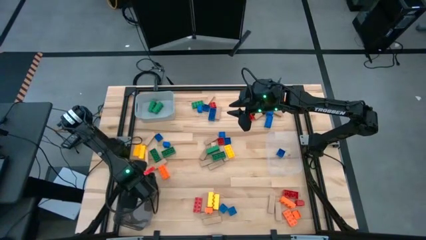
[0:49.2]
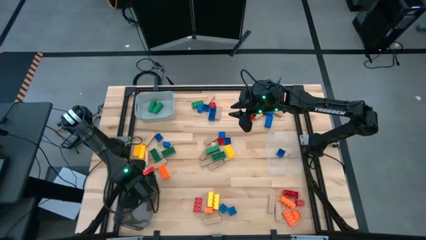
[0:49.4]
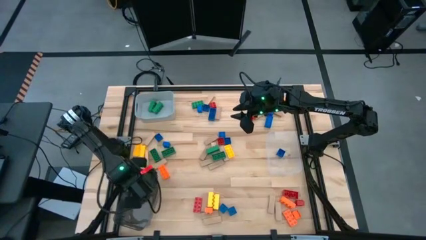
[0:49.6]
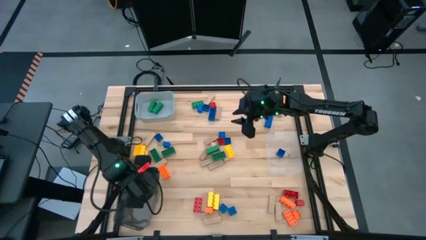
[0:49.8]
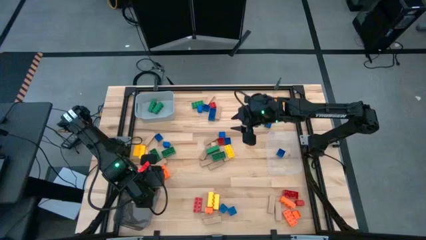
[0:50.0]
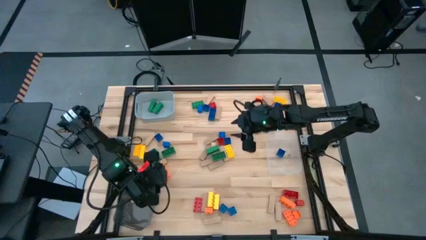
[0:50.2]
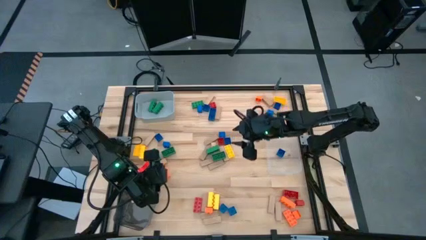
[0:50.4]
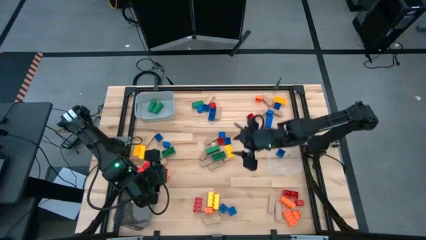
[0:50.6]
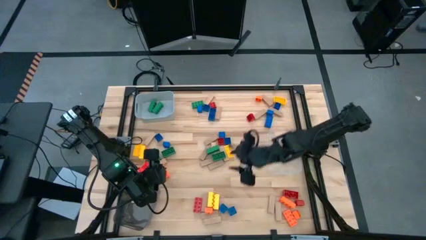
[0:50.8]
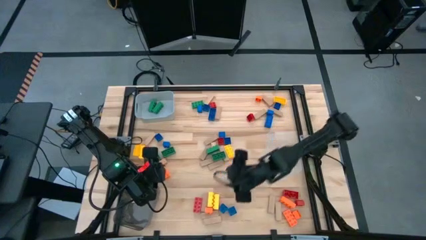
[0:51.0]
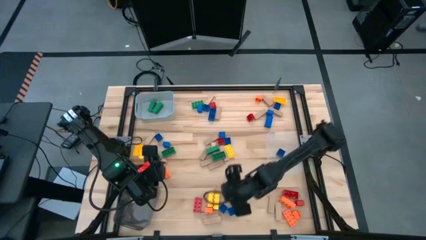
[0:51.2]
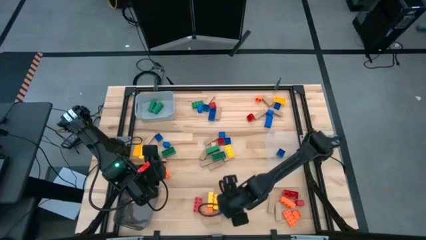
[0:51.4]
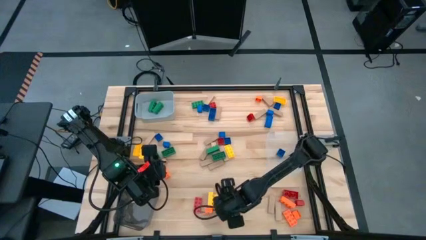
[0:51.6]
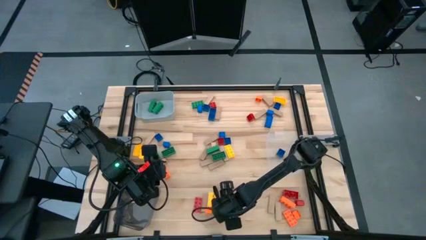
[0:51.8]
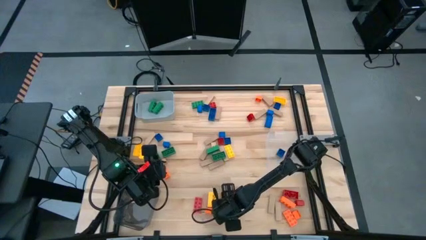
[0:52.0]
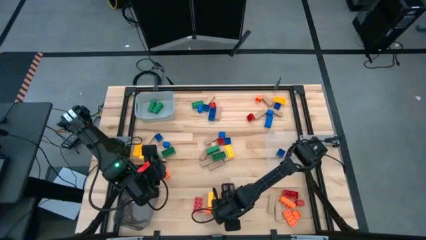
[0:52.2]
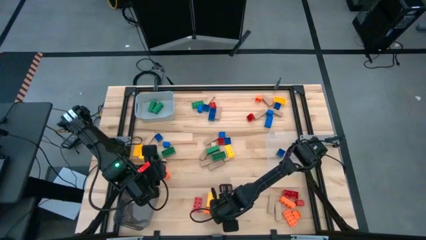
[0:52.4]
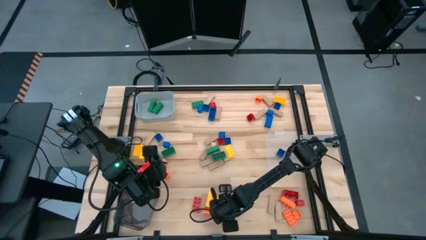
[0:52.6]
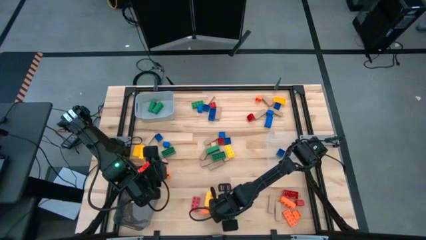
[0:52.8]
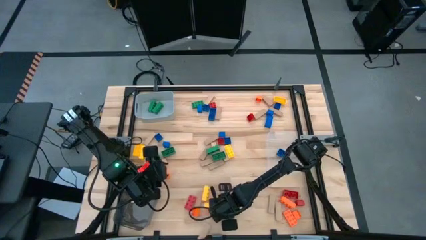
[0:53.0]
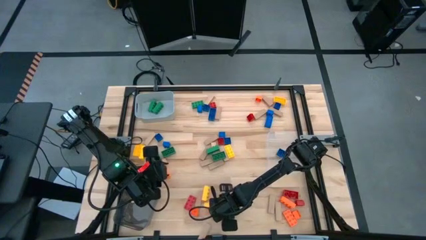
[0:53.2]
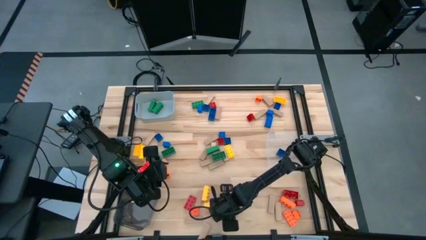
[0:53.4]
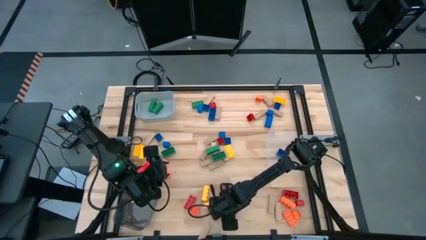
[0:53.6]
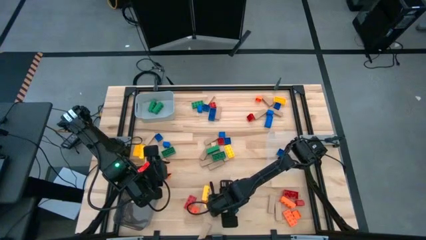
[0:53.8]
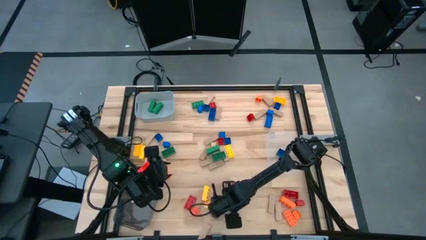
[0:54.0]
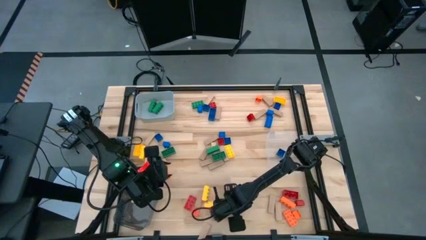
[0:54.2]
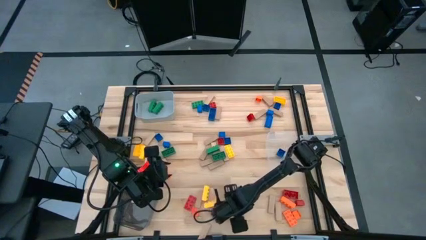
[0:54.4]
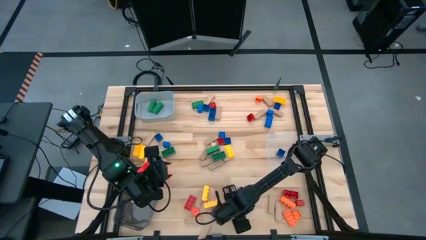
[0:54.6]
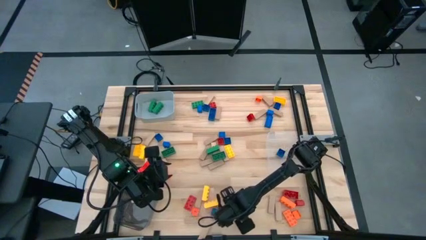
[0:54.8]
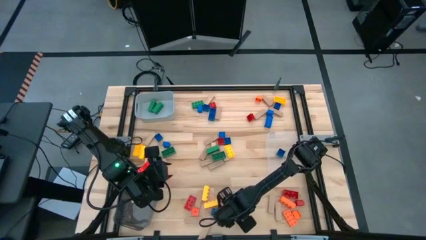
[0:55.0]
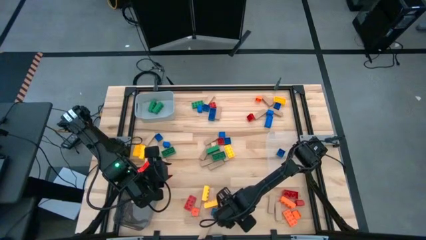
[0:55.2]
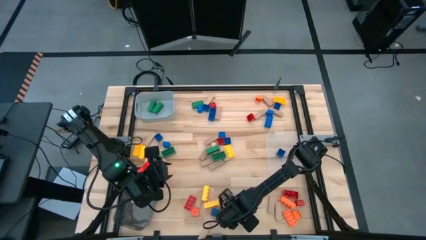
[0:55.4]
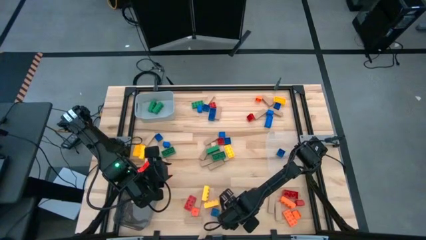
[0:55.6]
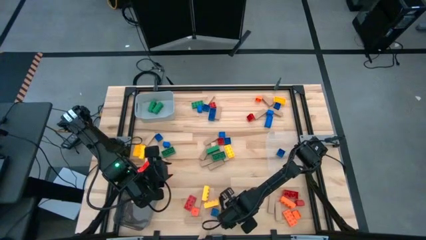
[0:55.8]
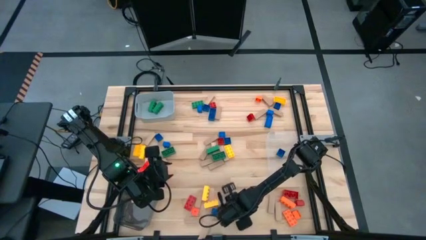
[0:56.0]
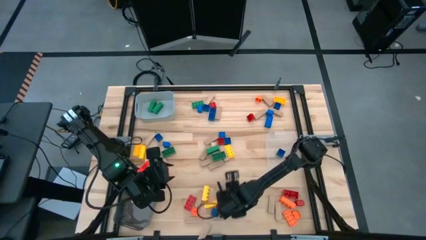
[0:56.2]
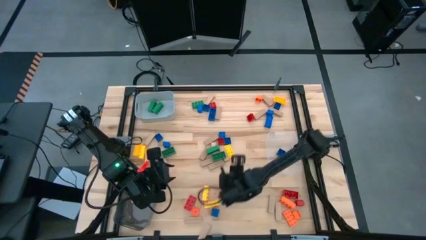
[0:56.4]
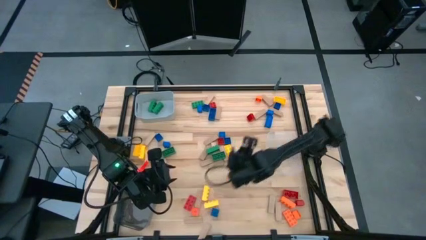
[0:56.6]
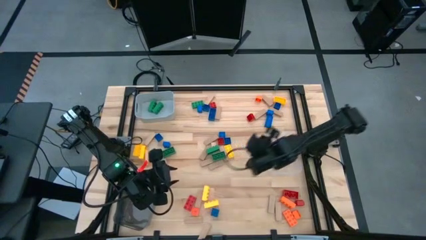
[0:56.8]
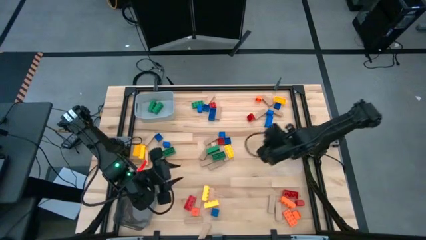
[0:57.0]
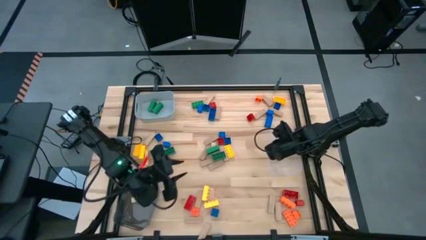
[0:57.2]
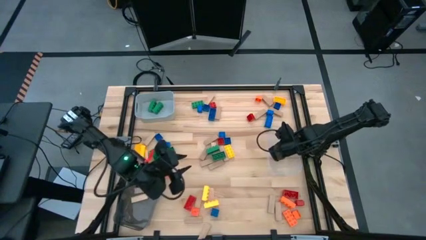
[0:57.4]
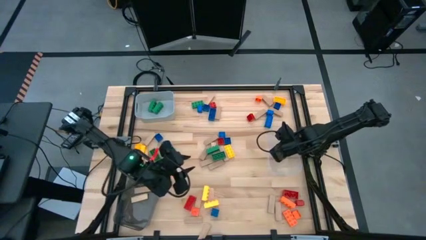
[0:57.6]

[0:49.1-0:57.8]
Task: Sort blocks by size
Put the small blue game piece into the transparent bin

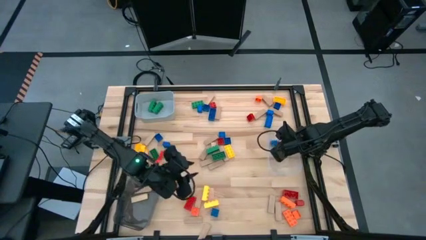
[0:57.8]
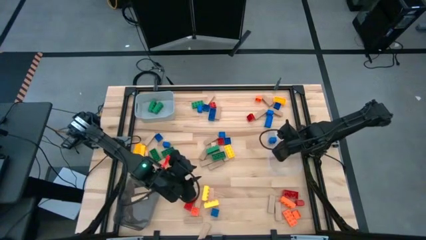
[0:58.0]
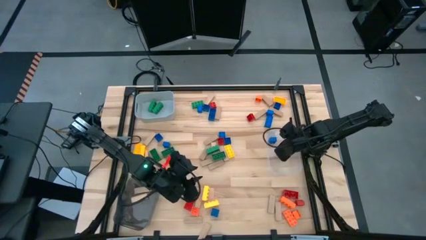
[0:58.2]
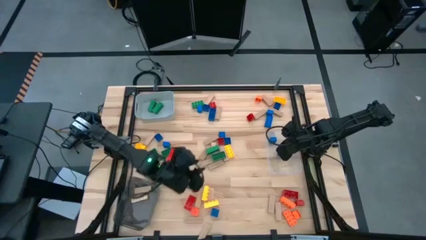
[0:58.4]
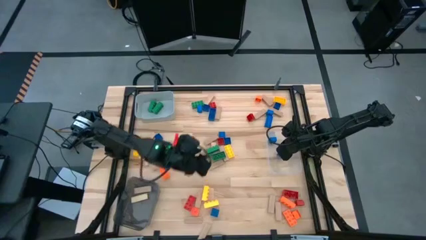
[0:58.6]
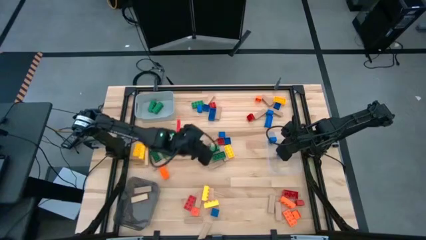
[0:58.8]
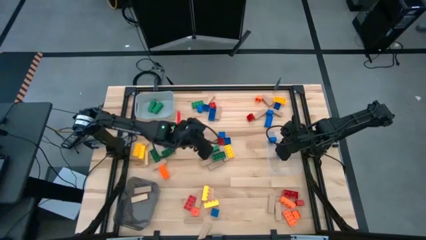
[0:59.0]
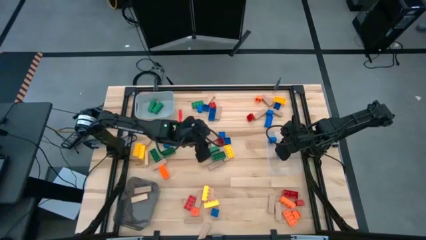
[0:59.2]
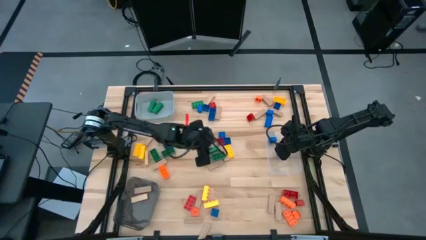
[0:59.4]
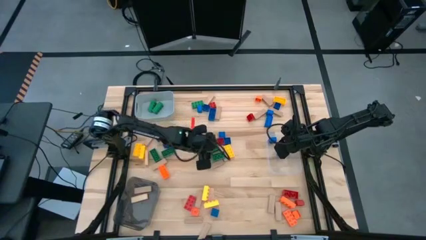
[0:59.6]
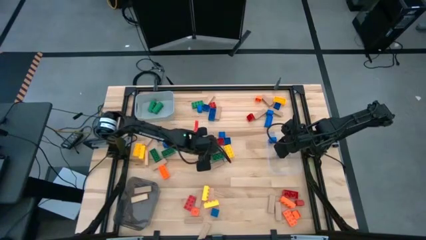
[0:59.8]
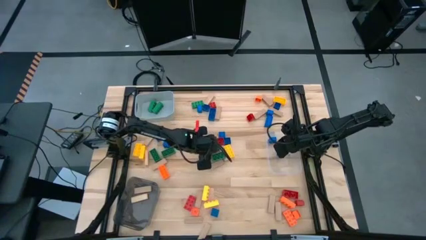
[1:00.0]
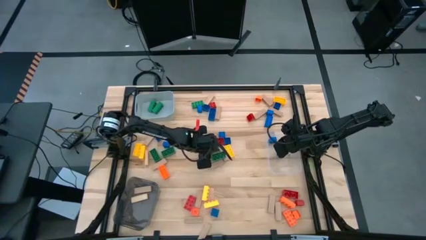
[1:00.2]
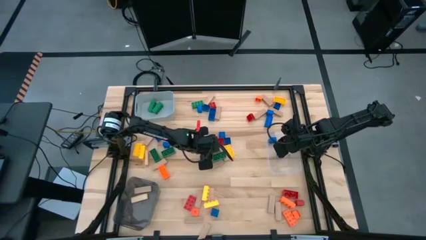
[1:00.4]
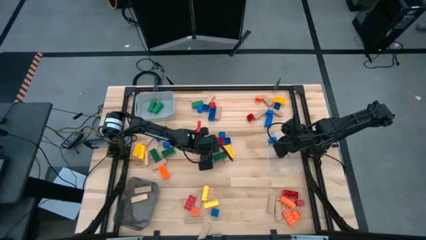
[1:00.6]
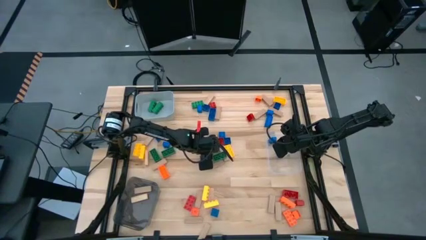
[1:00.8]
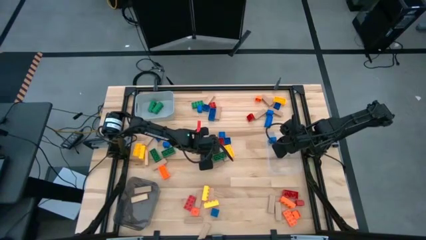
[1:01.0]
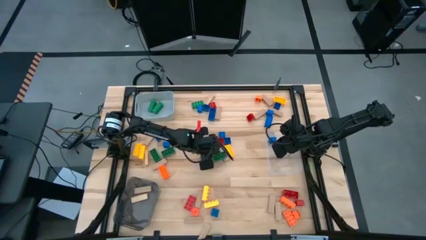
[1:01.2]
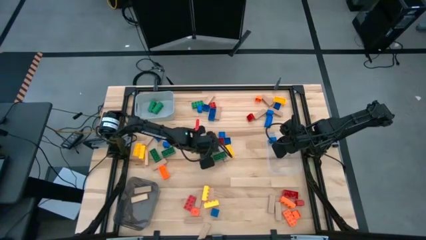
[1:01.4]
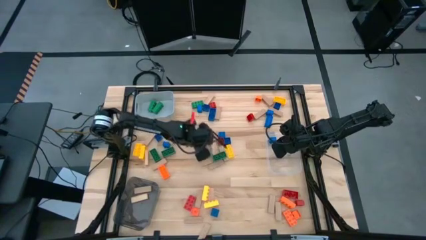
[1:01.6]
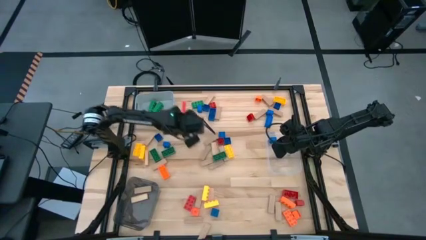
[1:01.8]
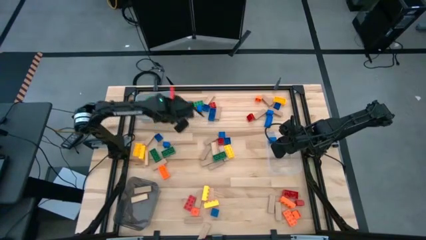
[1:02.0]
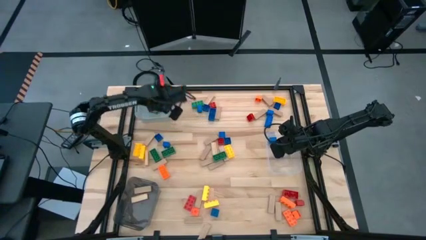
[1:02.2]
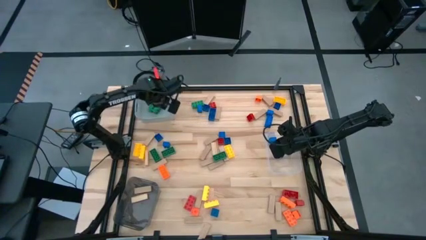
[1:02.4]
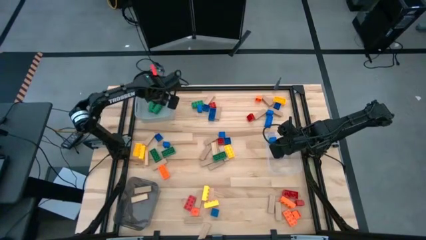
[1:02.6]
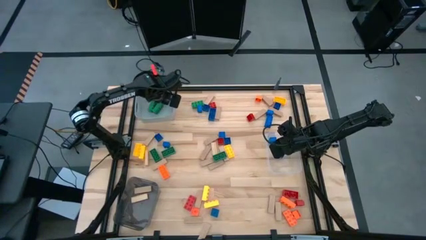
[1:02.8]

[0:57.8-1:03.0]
Put the large green game piece into the gray bin
